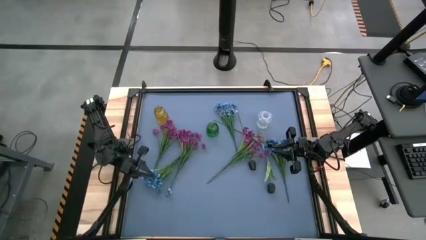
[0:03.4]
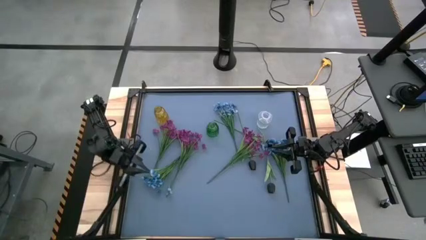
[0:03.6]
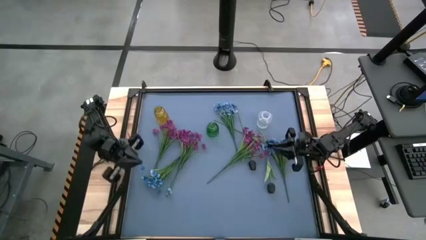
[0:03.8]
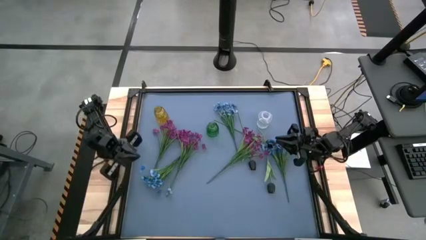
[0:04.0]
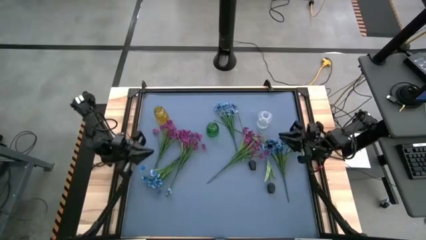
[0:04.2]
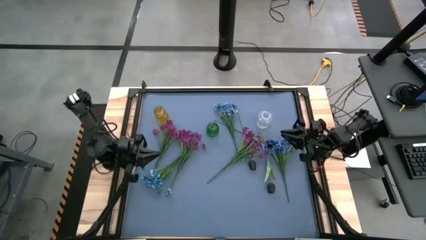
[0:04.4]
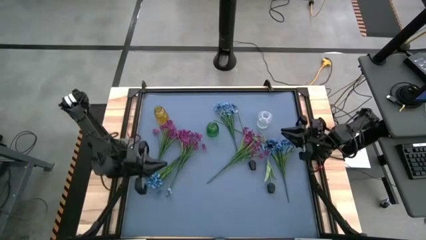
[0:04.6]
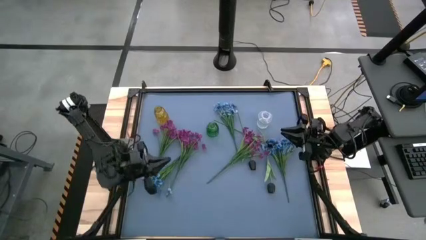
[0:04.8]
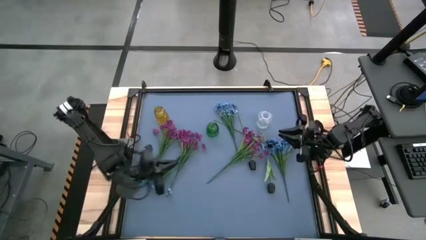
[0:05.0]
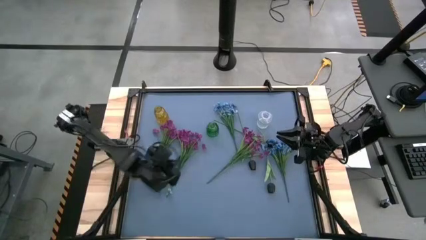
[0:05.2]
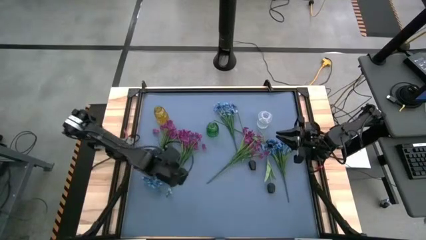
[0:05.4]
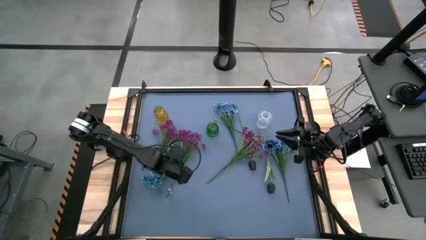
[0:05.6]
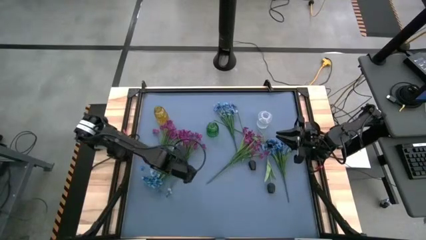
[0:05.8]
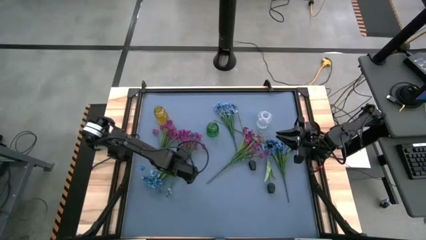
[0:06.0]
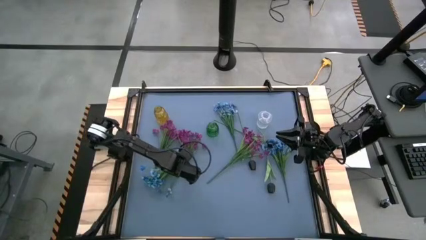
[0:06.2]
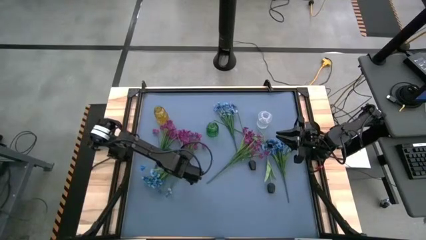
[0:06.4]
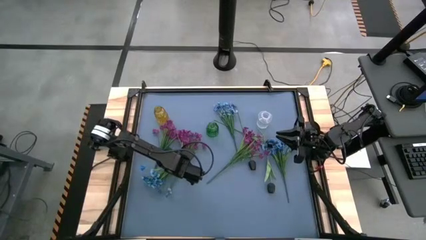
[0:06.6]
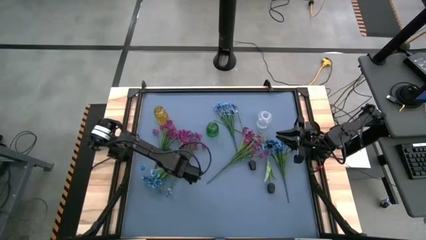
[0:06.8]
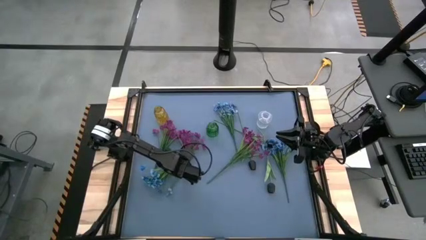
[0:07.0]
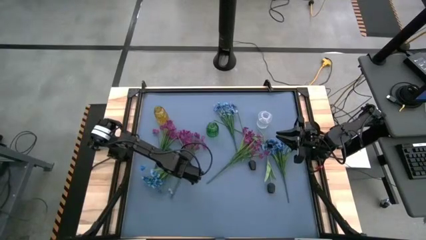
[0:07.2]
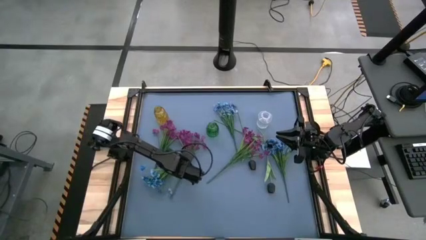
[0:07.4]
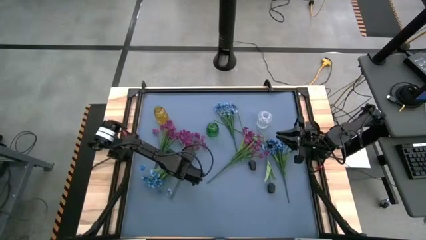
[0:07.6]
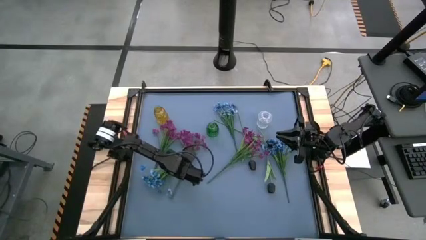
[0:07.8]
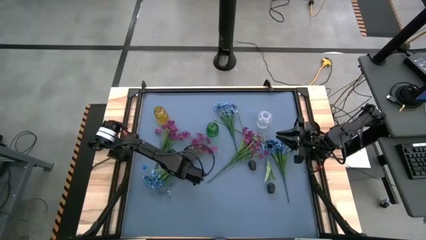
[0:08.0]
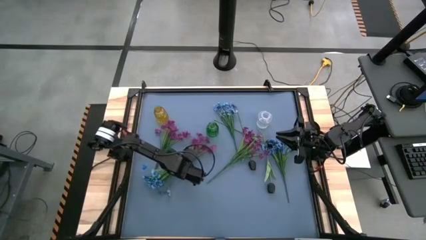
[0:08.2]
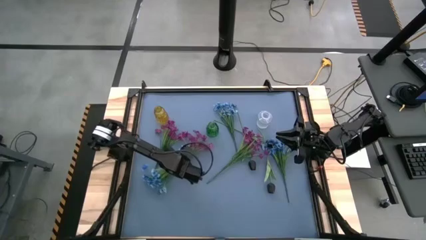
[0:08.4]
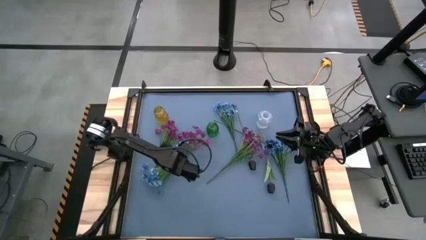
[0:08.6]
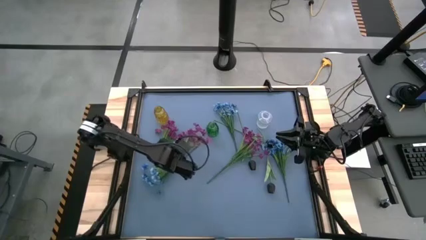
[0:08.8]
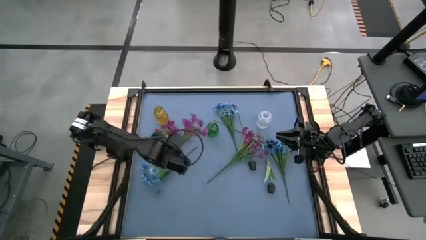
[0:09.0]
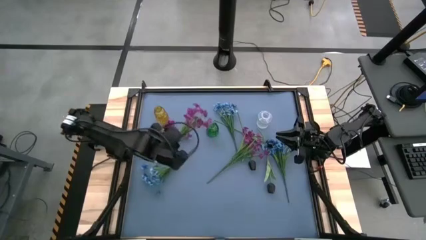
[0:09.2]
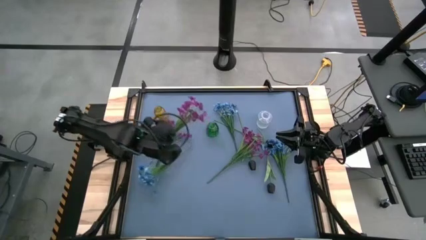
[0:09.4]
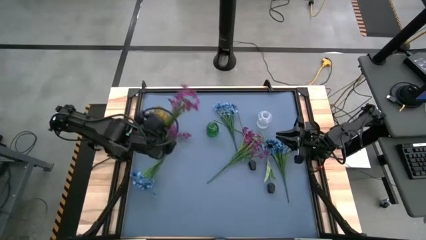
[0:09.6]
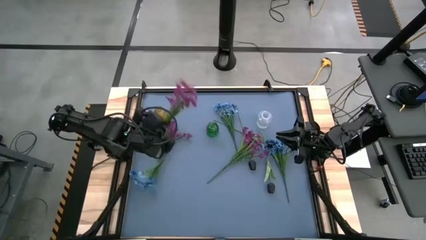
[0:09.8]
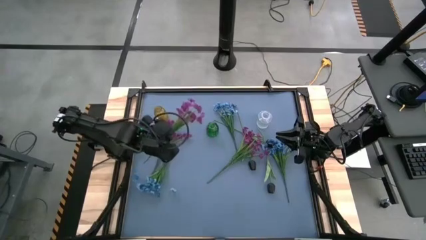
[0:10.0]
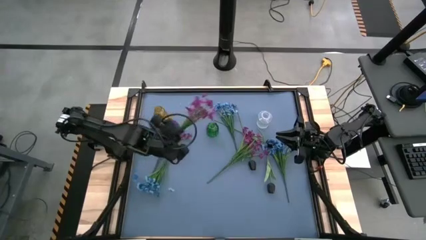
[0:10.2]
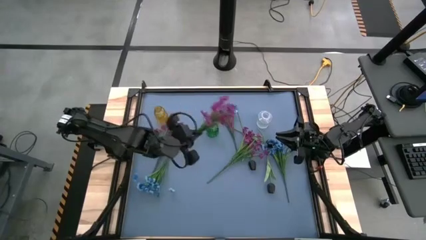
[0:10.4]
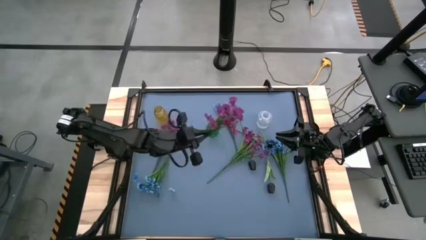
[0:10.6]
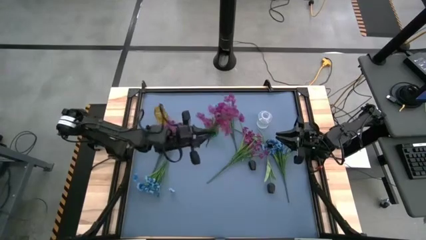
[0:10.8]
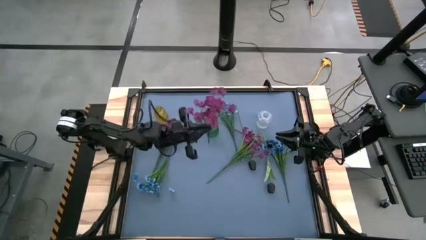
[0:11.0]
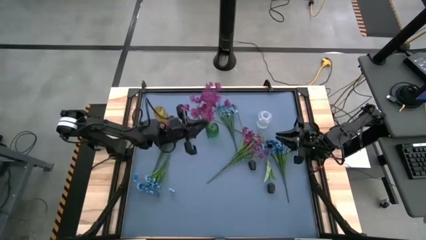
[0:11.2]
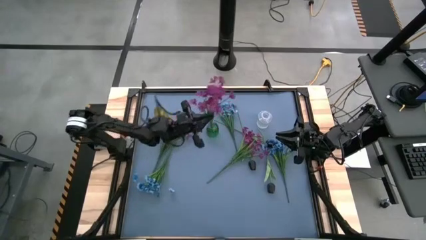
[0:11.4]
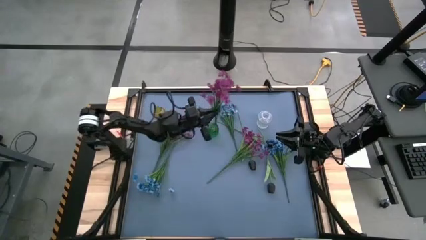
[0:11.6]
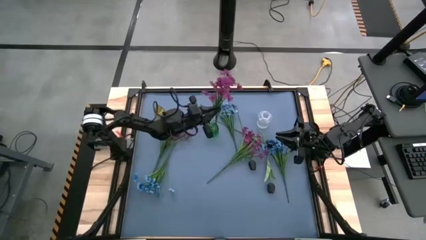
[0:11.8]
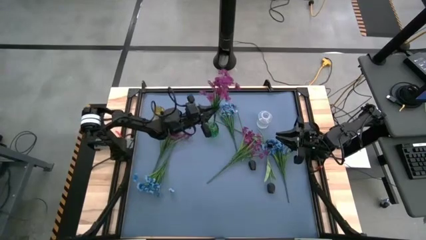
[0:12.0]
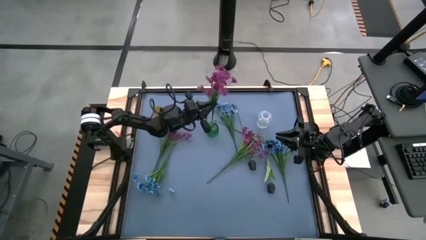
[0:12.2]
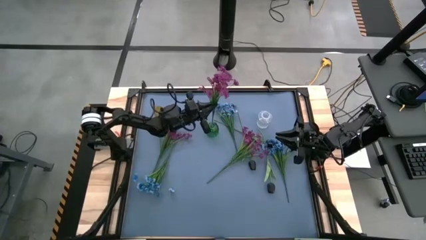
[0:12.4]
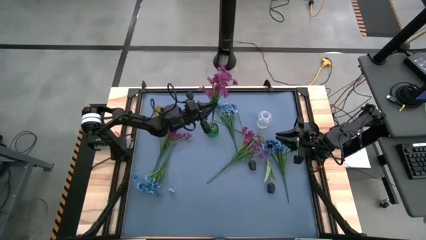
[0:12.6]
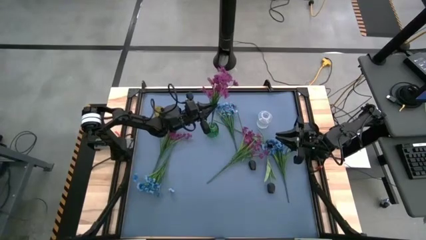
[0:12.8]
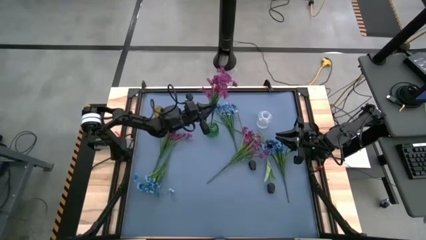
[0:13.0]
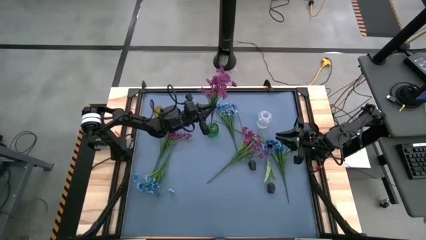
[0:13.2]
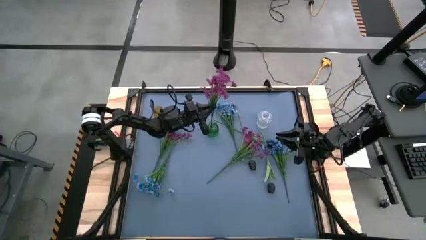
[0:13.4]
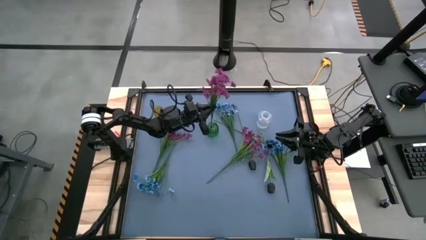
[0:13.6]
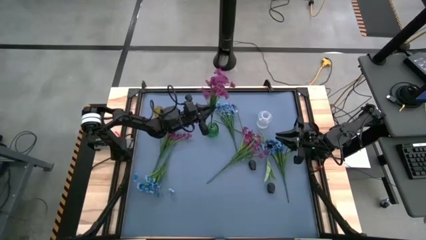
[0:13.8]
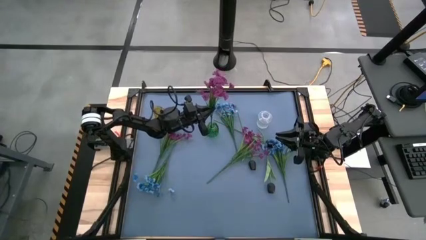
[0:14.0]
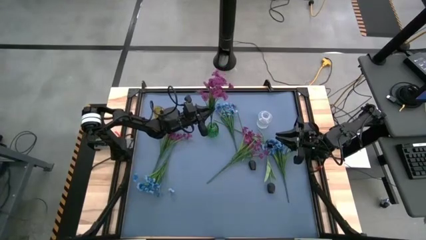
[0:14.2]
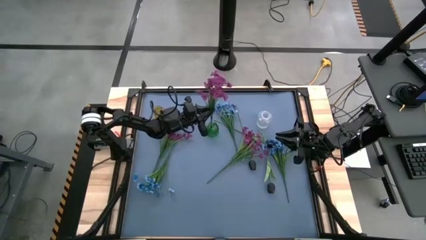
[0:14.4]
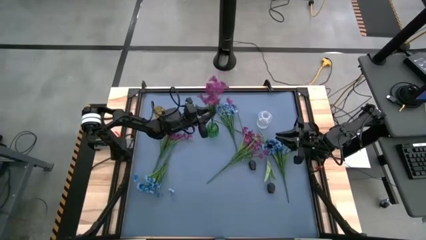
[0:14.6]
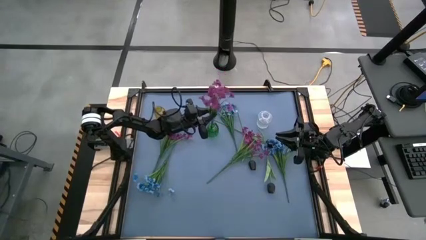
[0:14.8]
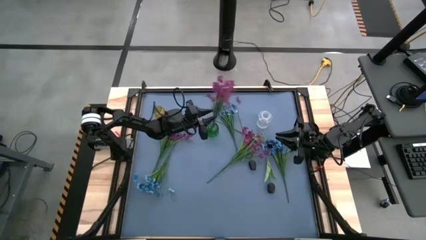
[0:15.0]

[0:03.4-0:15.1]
Task: Sort flowers into vase by color
Put the middle purple flowers into the green vase
